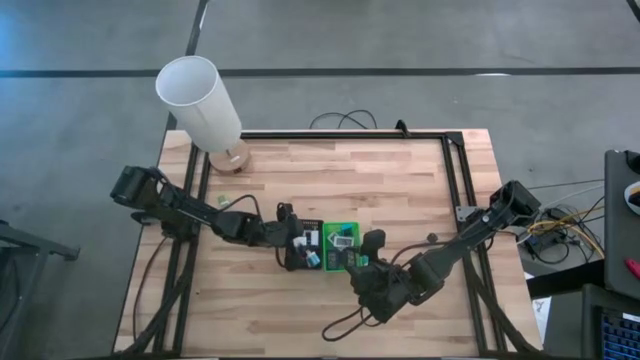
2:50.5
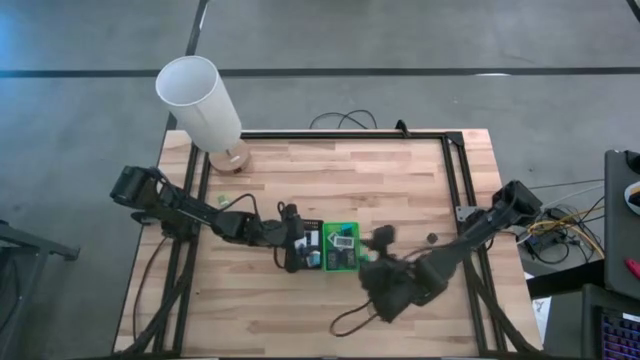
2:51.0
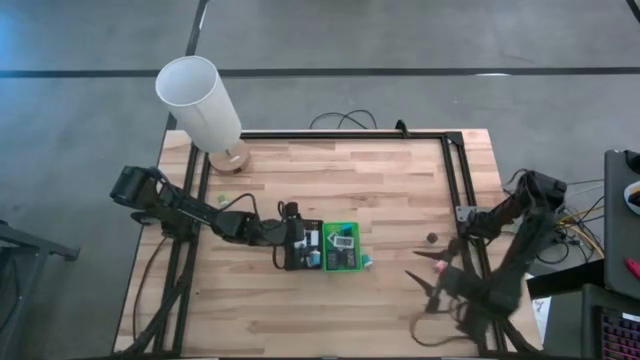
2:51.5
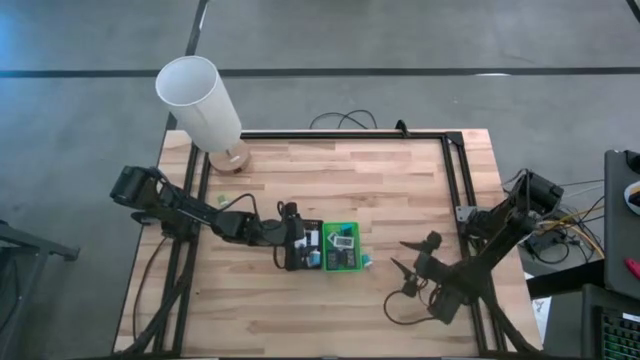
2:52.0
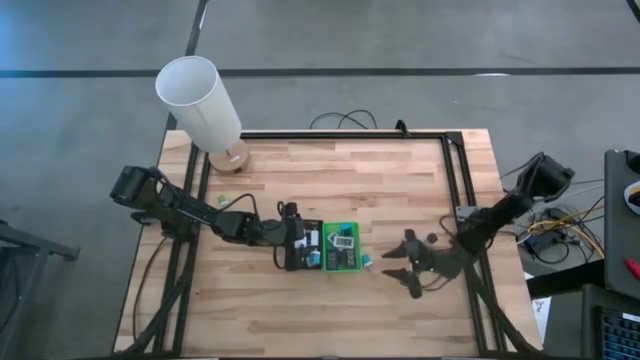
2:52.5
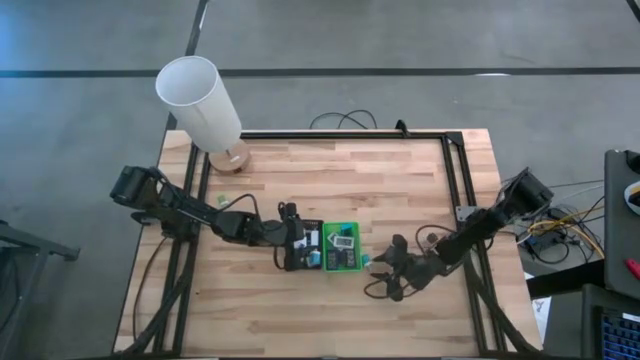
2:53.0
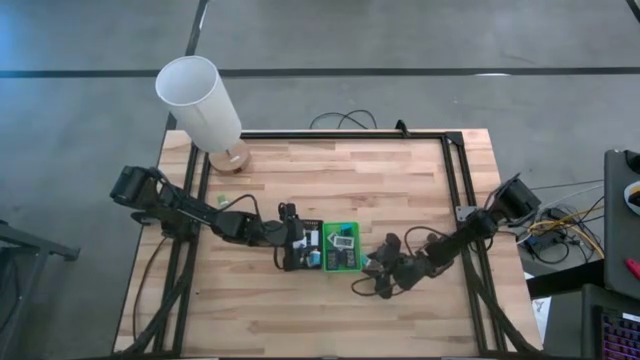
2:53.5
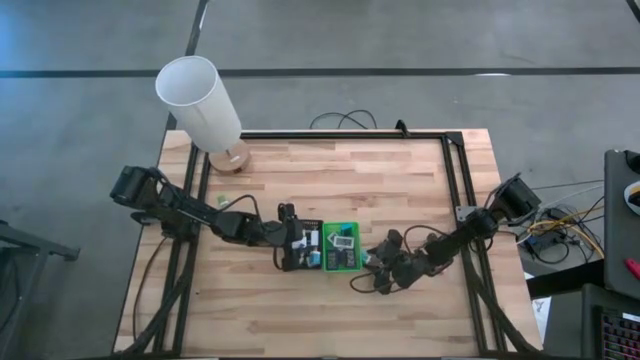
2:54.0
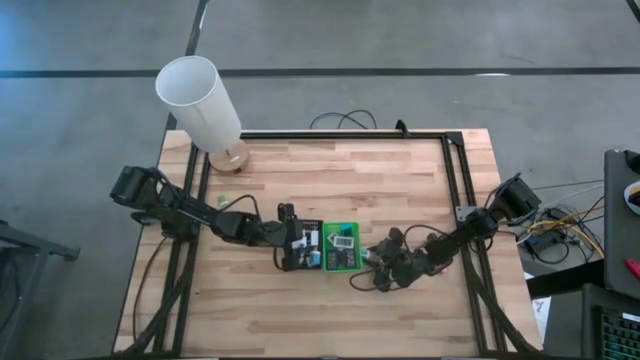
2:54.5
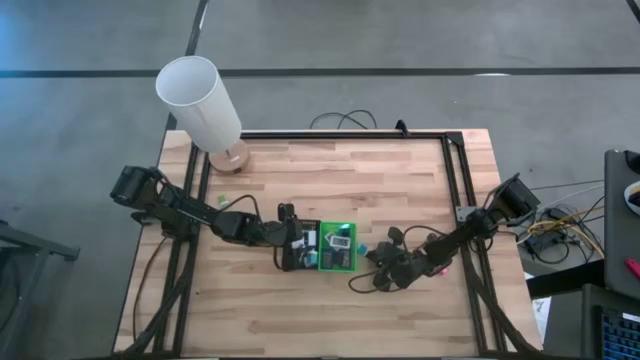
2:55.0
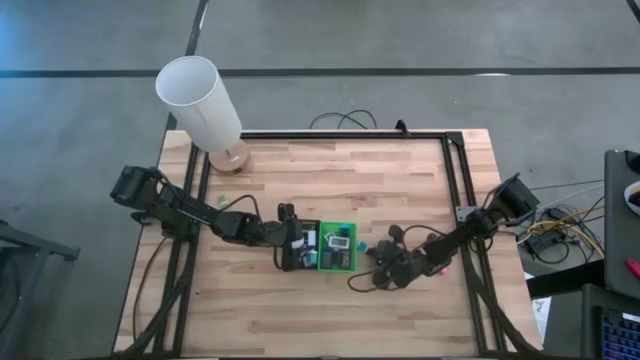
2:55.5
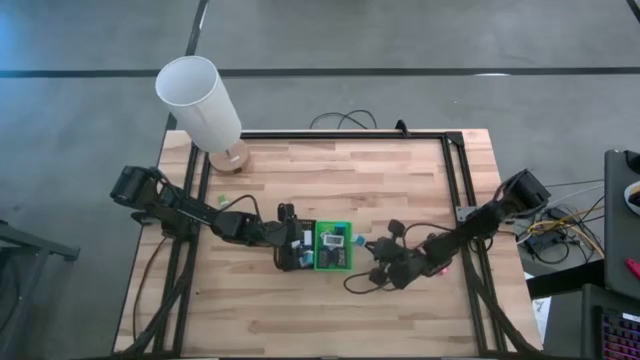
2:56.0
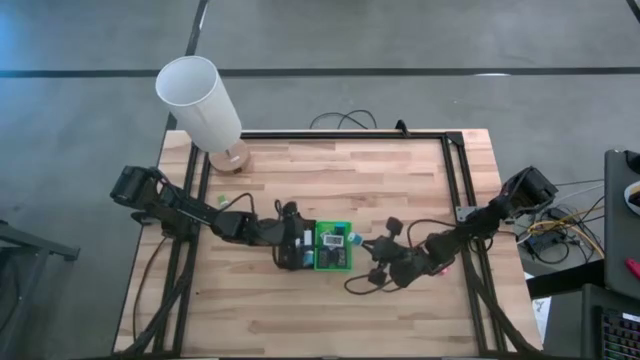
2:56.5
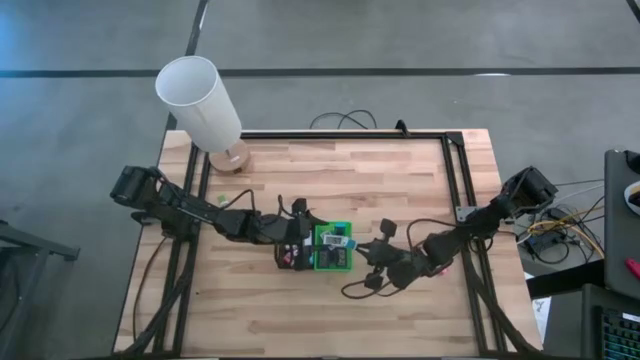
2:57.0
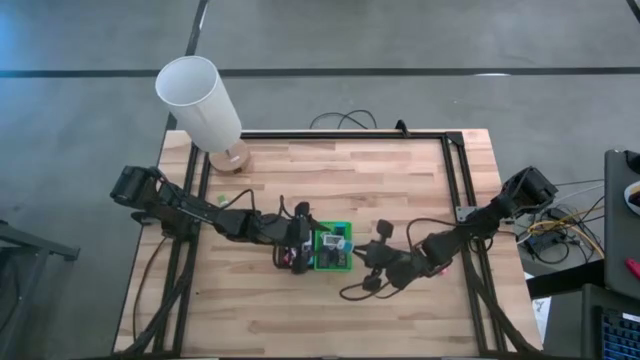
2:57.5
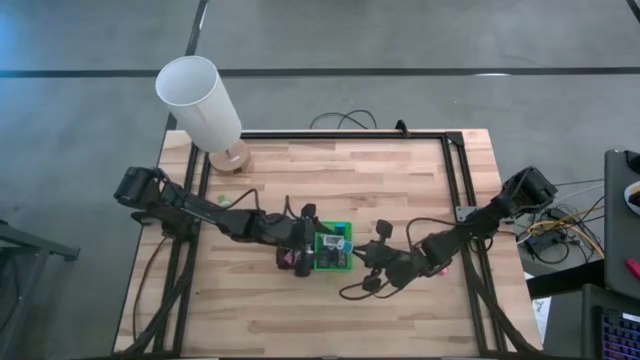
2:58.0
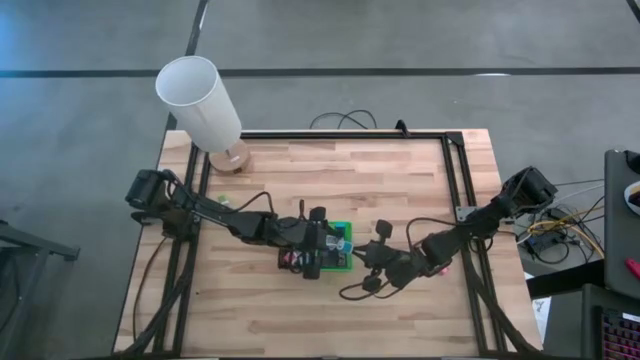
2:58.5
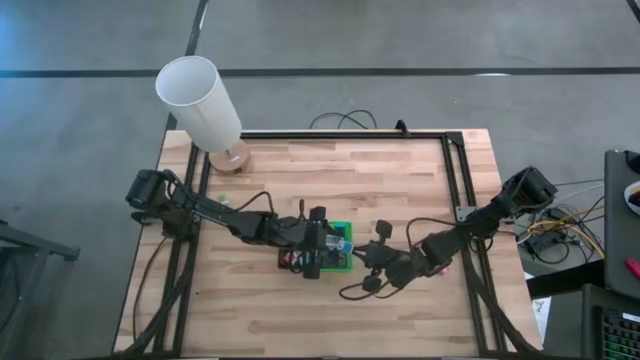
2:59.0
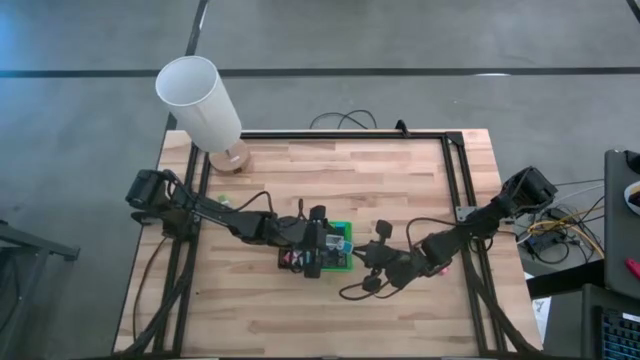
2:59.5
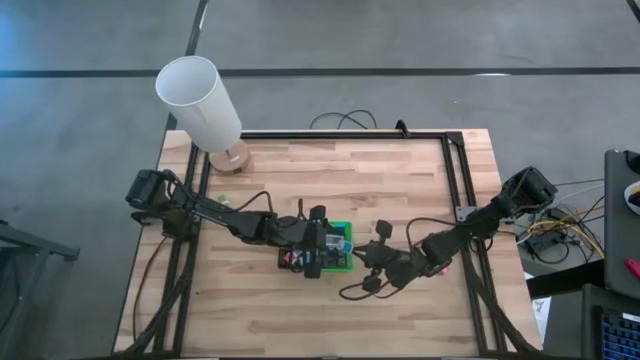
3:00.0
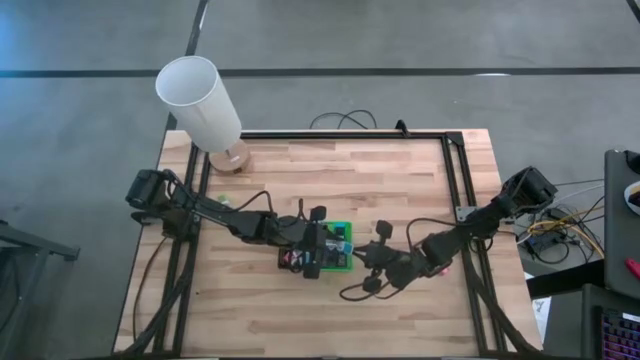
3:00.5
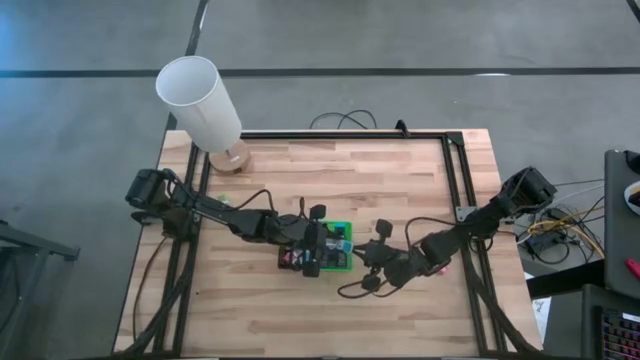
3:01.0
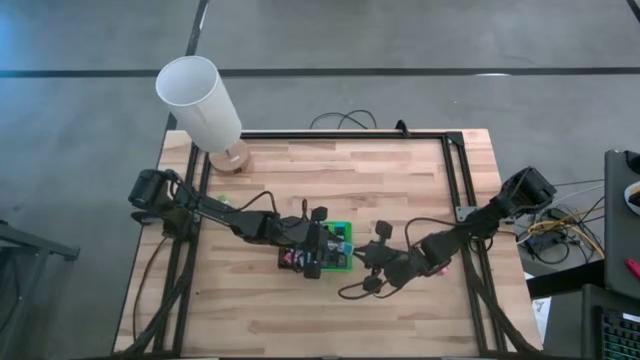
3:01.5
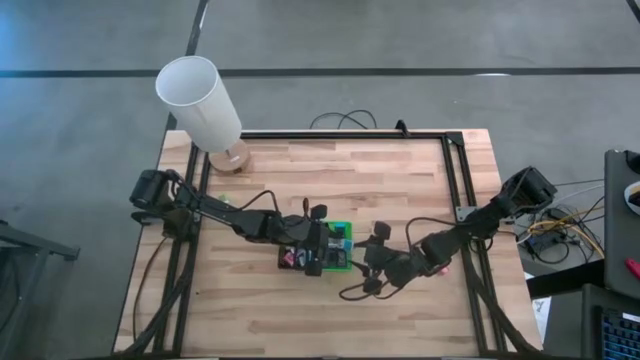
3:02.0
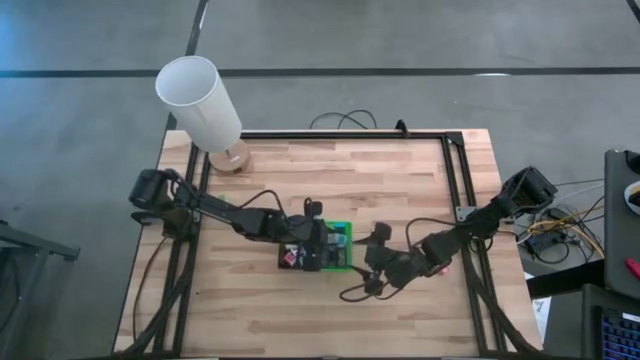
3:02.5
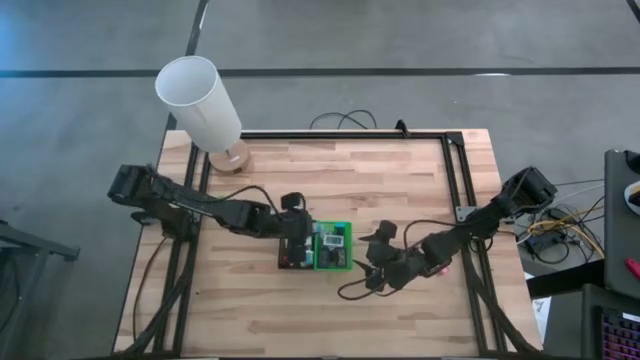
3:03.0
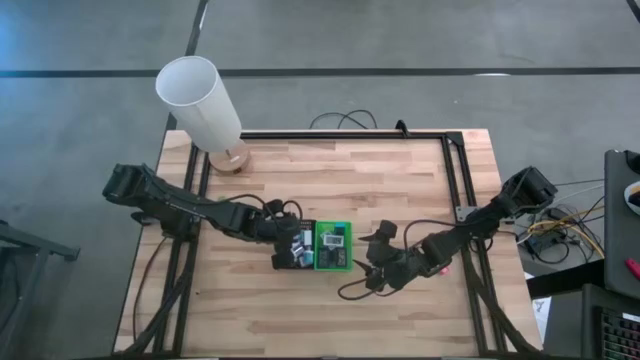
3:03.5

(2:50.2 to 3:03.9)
Task: Pick & Place Office items
Put the blue white charger adapter into the black bin

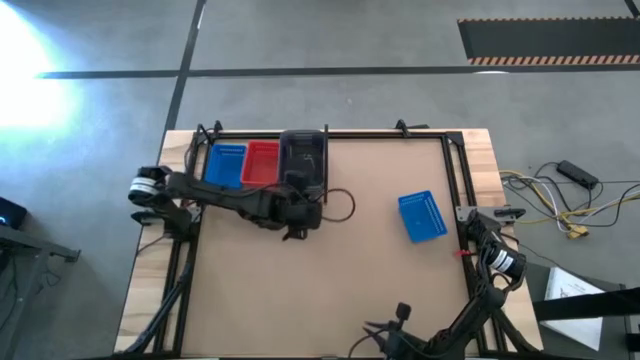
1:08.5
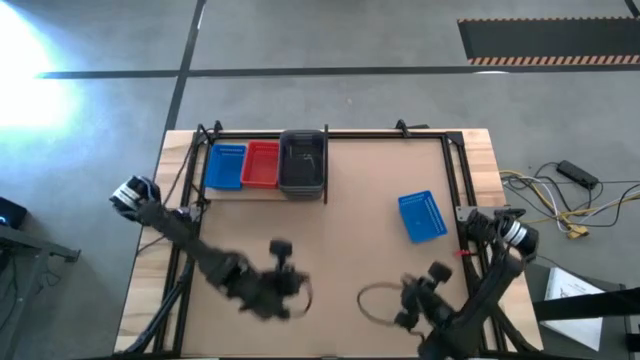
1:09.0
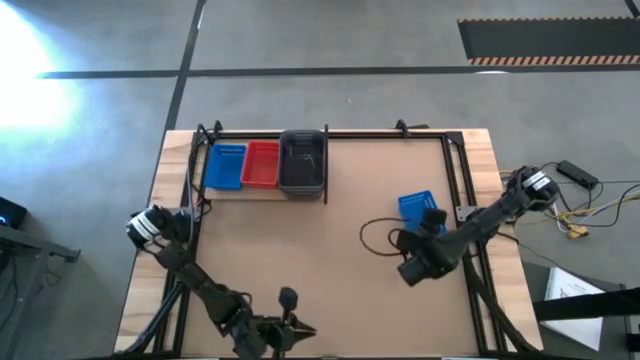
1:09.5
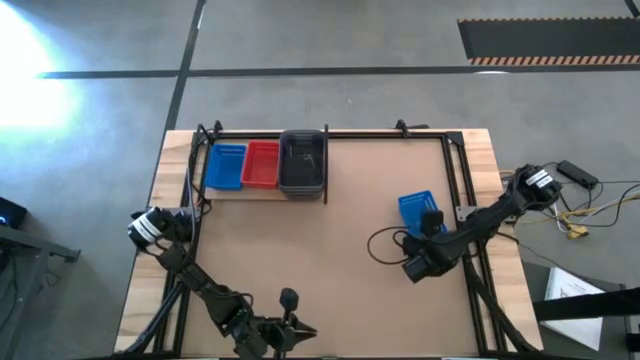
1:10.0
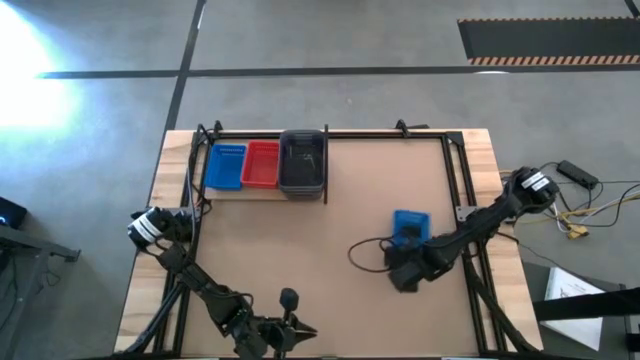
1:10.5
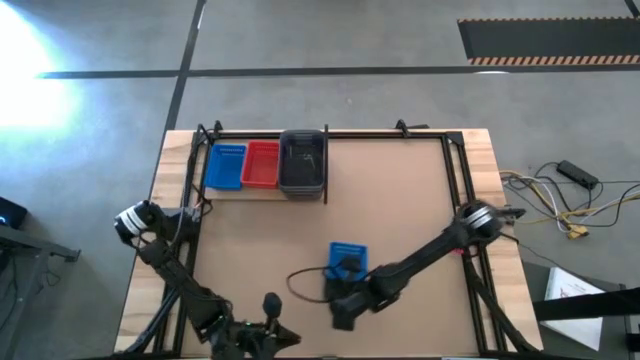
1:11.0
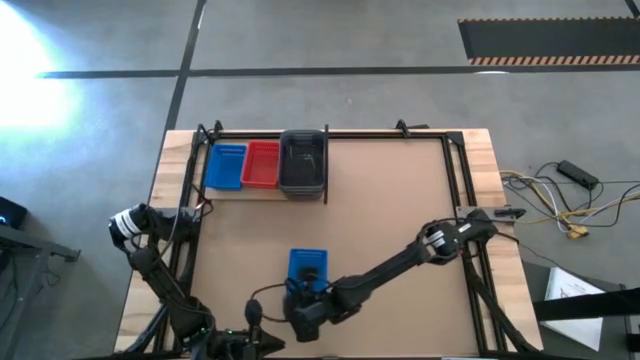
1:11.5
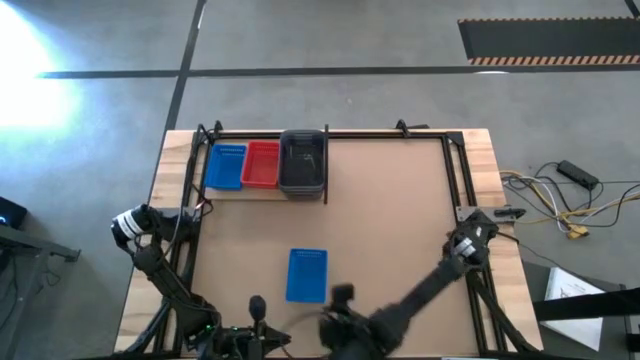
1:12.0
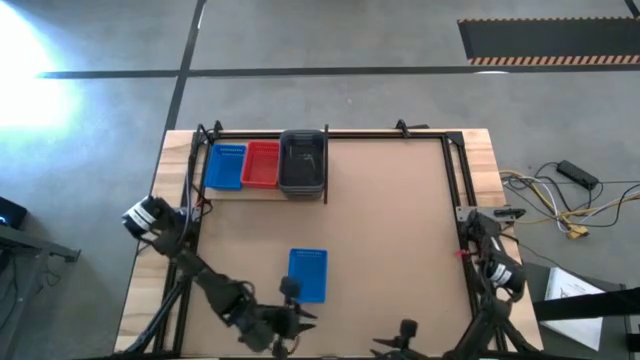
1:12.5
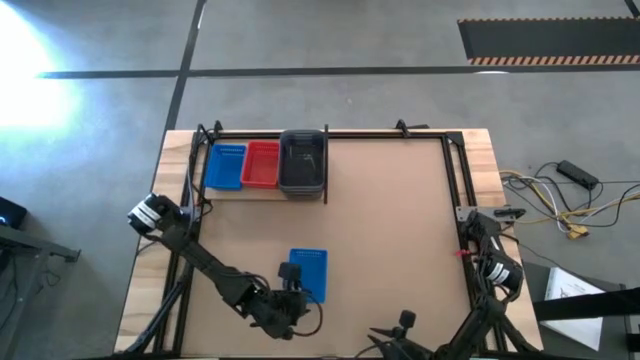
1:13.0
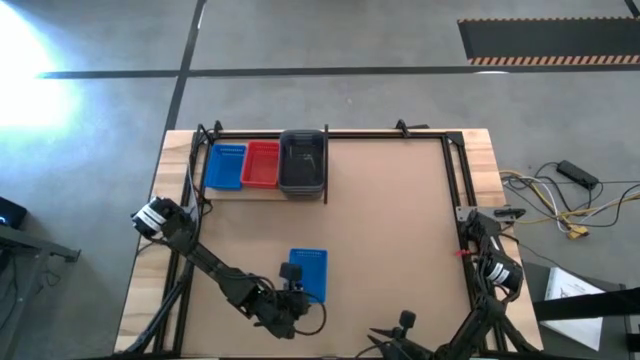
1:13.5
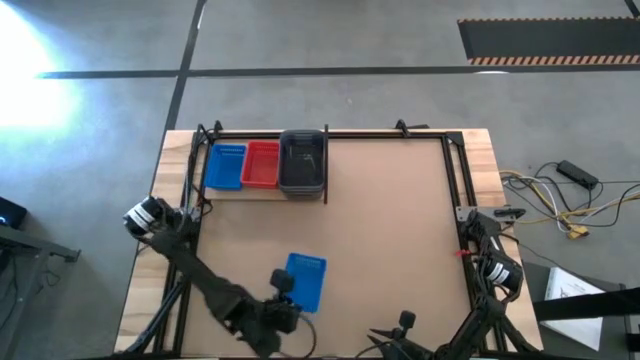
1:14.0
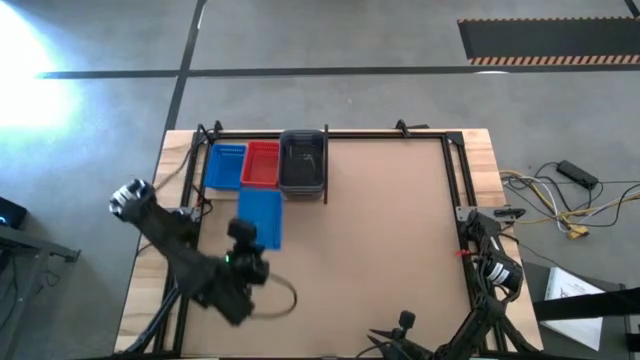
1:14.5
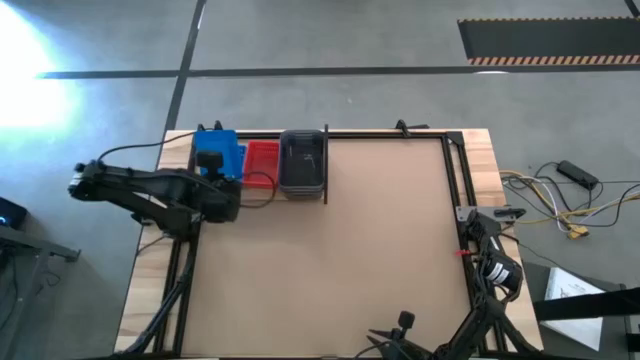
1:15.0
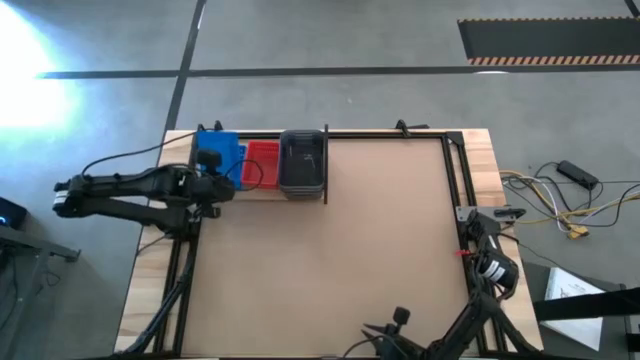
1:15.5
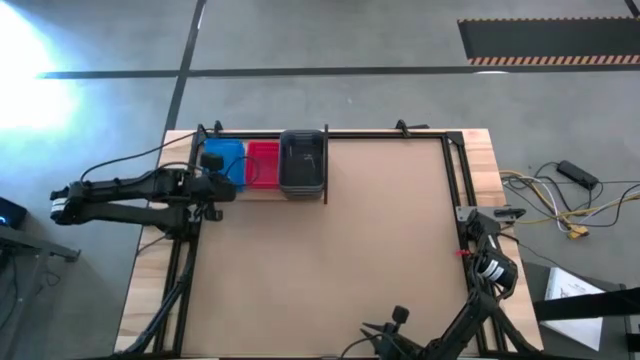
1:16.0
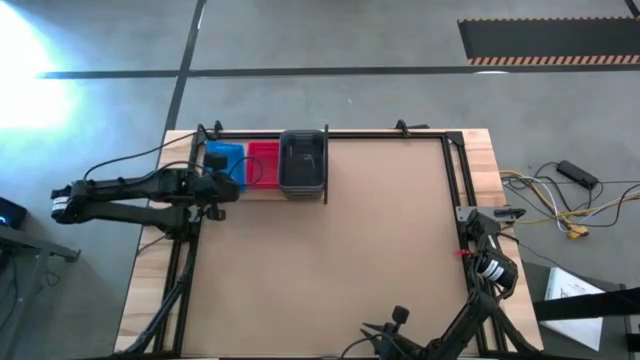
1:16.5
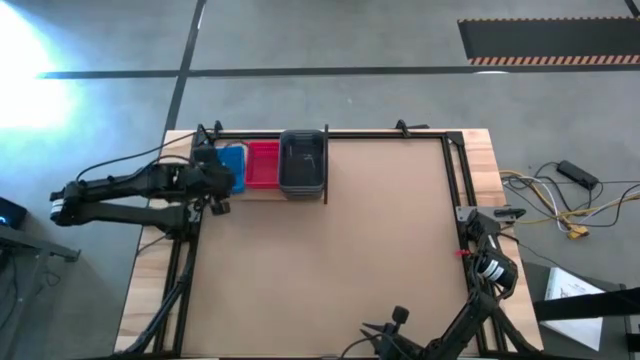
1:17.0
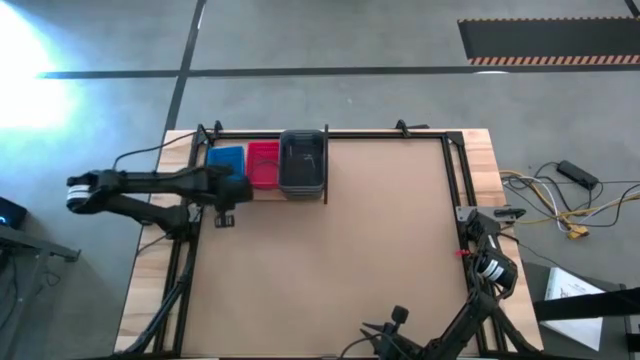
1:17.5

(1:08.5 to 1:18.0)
Task: Stack baskets on shelf by color
Stack the blue bin on the stacked blue bins on the shelf
